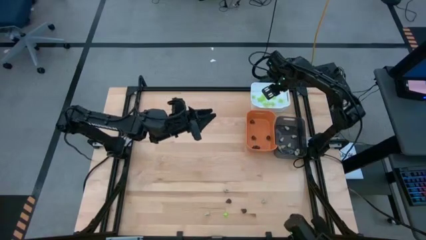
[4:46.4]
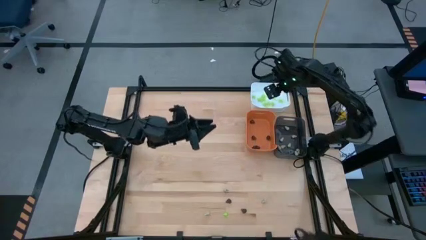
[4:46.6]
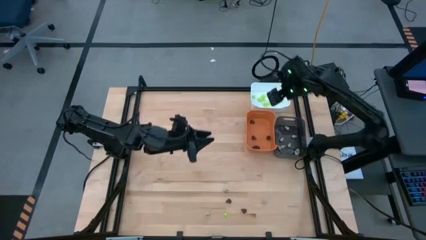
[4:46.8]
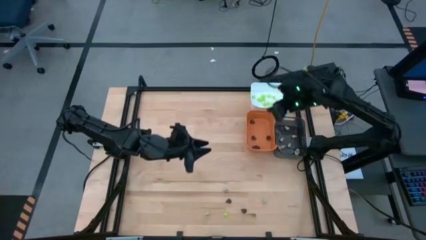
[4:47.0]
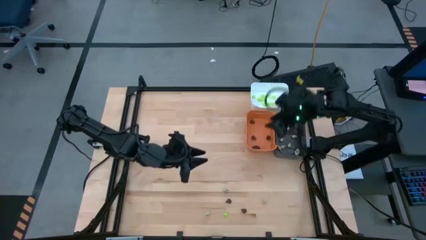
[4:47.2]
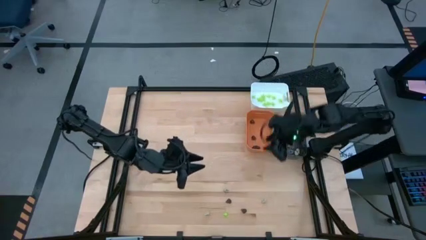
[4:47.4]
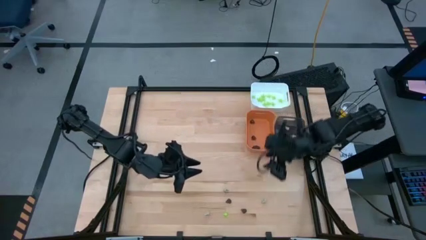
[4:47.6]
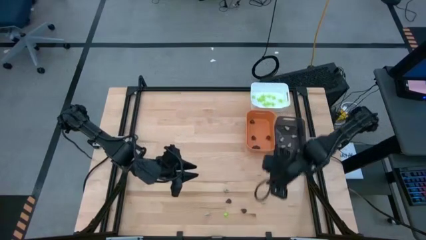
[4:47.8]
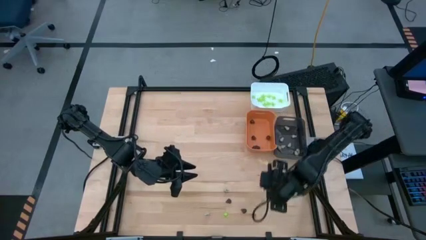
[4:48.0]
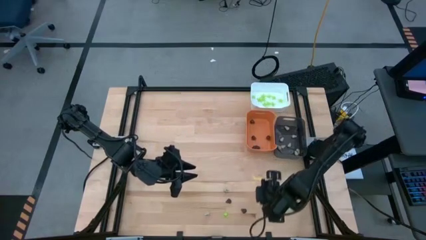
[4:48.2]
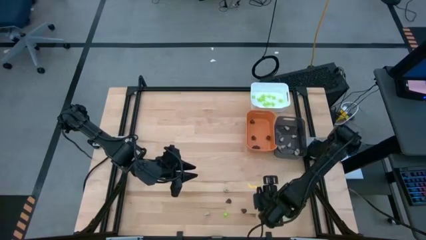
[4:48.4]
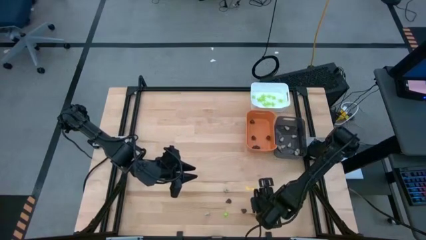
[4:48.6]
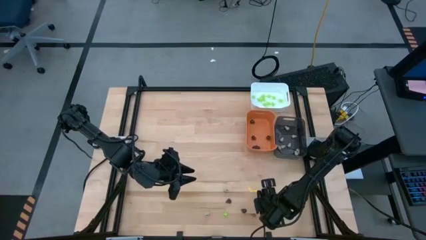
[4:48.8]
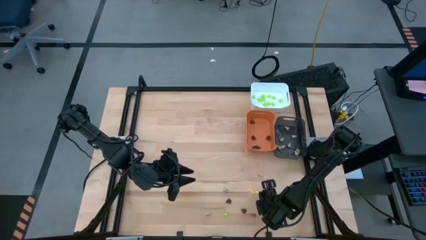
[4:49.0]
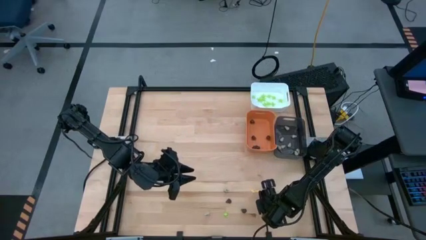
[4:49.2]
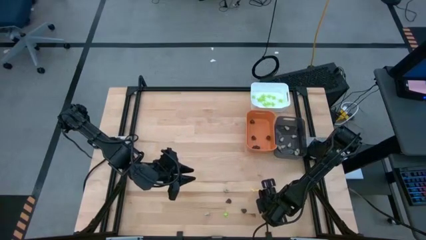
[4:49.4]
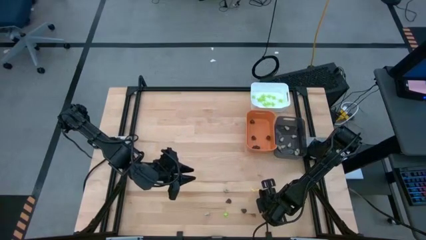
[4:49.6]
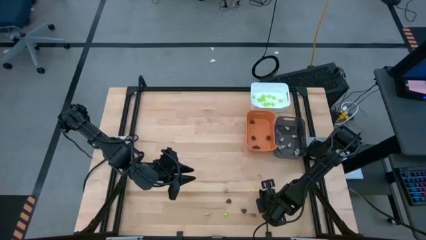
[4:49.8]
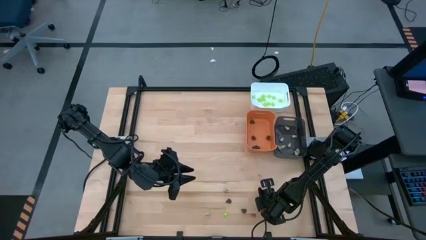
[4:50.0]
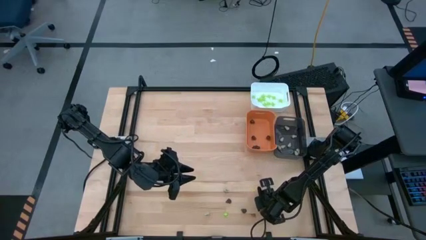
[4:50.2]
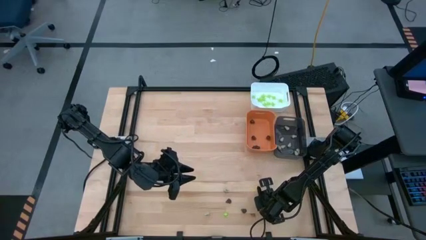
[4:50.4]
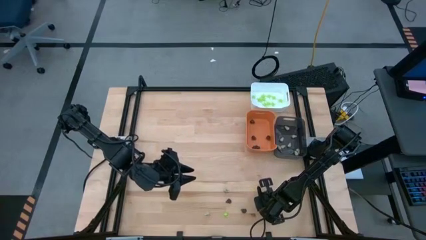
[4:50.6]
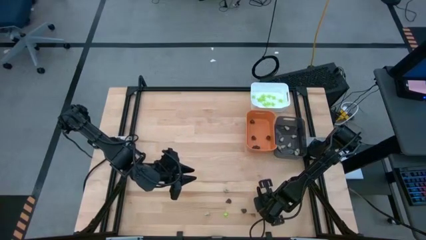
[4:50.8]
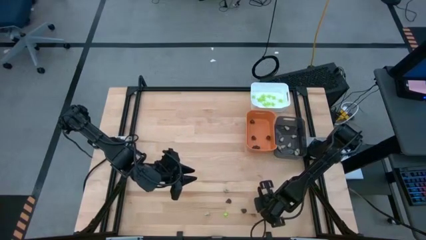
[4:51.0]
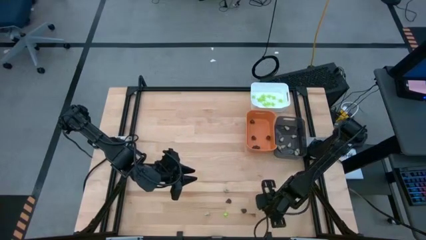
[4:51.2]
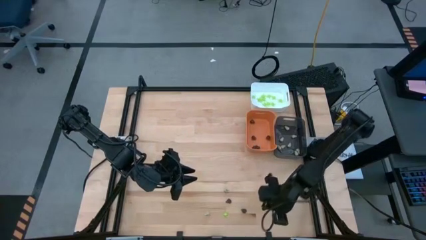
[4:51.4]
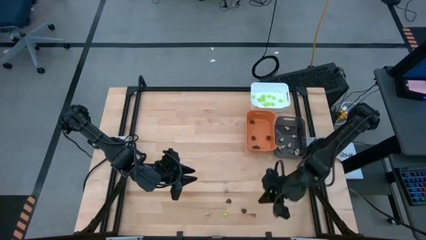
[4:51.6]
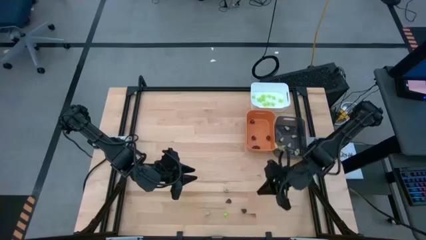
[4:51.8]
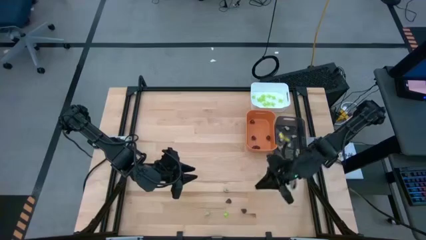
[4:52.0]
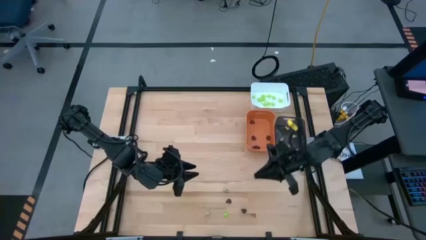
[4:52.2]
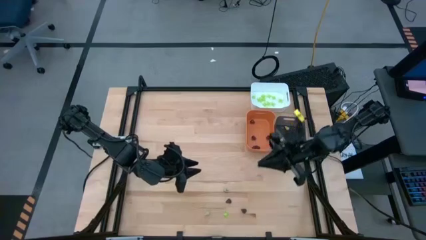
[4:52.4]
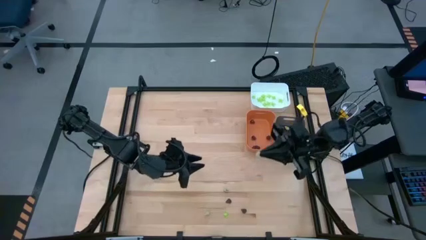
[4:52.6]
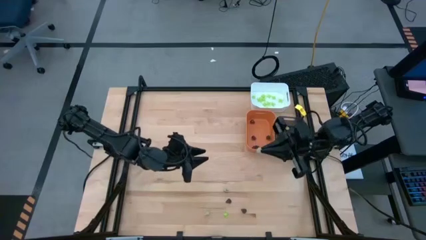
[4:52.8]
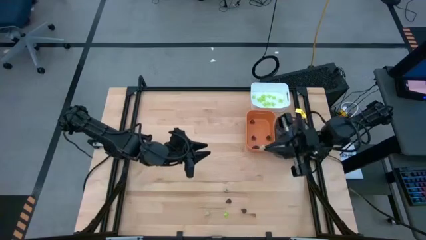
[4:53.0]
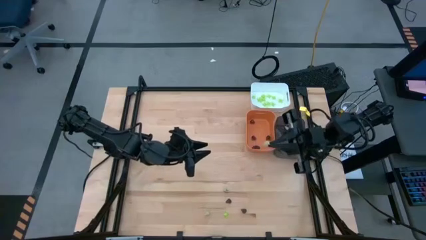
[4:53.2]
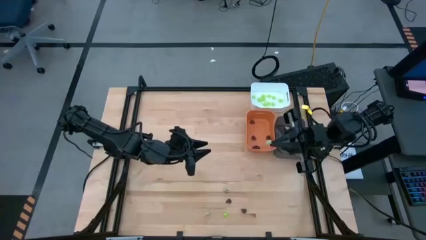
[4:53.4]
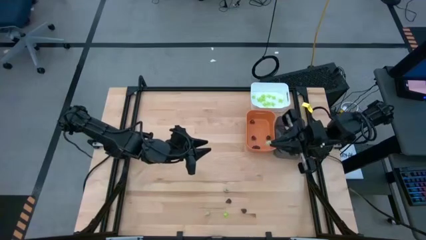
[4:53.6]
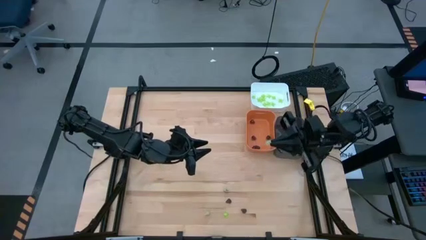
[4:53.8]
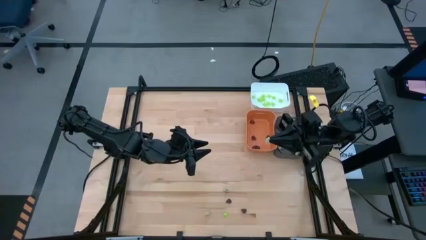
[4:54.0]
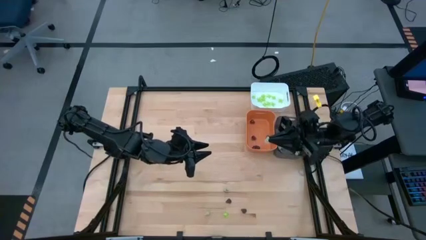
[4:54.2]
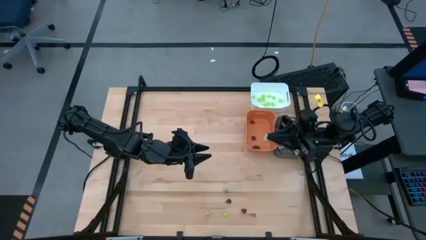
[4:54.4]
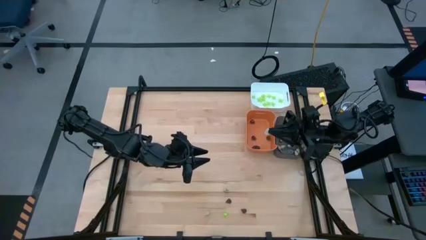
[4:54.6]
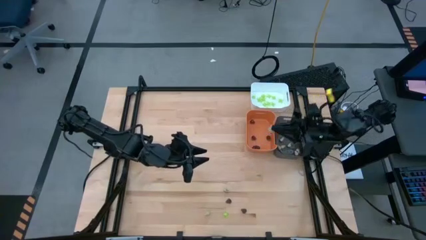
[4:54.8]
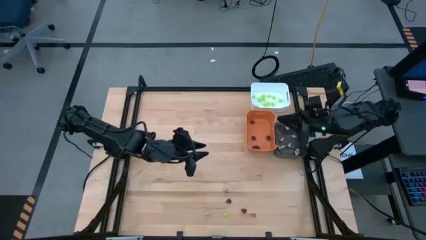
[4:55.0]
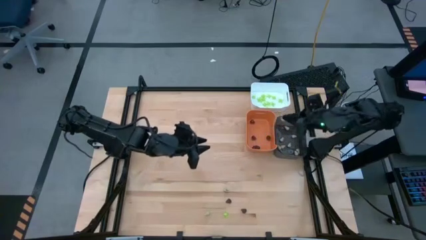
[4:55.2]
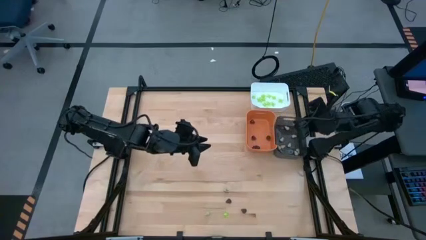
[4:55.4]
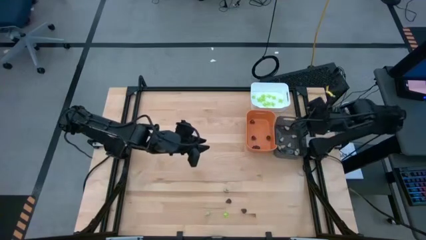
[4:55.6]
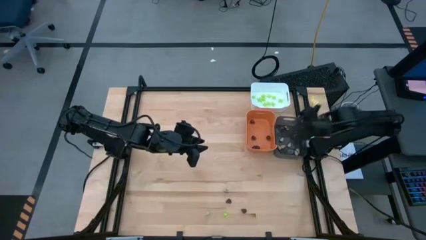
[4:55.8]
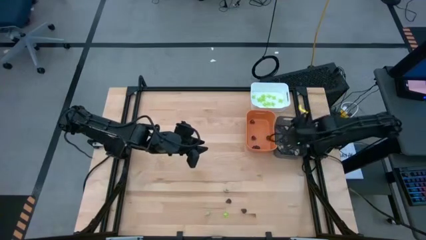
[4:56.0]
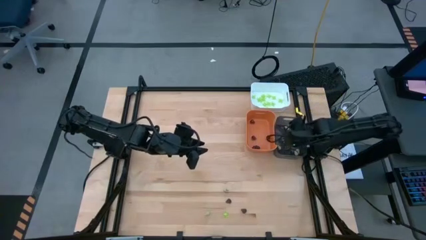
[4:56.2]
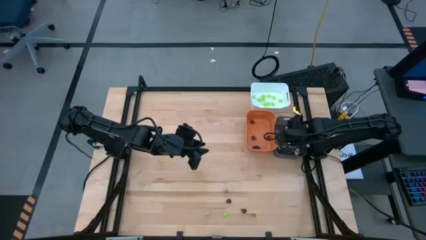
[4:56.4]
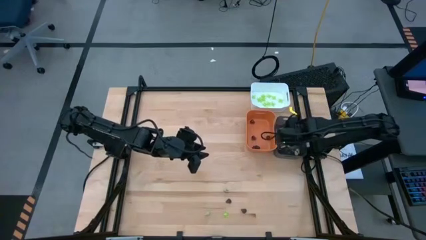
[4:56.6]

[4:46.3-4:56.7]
Task: Sort Halloween decoration
Put the white skull toy into the black bin

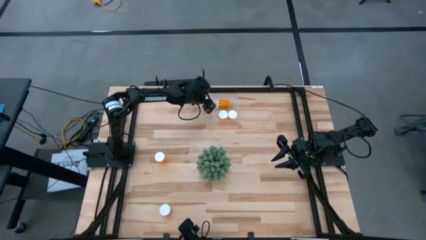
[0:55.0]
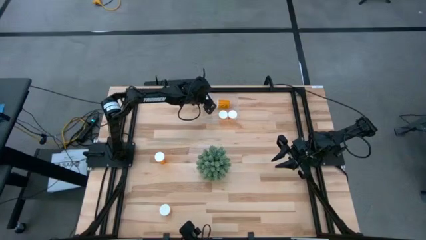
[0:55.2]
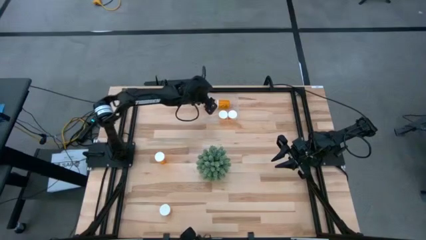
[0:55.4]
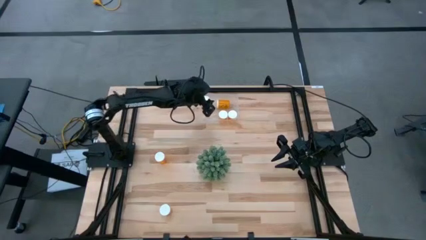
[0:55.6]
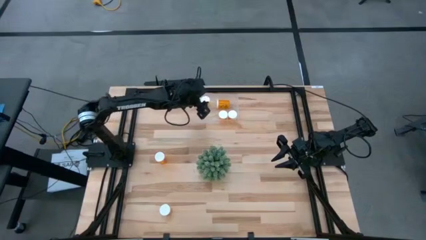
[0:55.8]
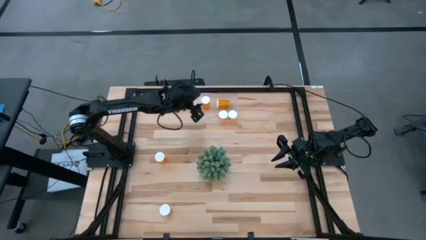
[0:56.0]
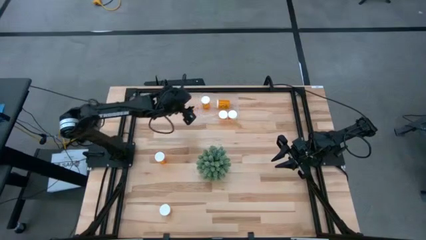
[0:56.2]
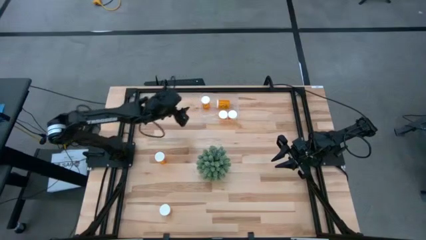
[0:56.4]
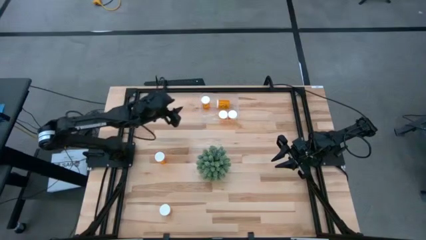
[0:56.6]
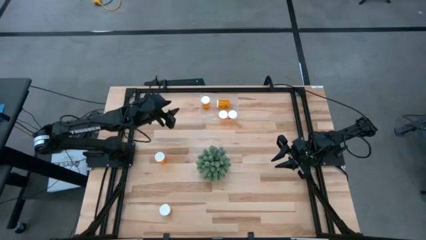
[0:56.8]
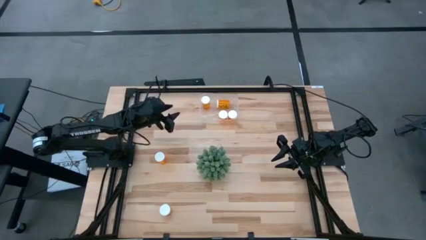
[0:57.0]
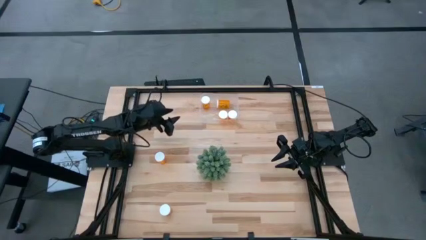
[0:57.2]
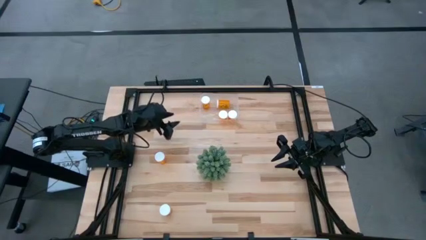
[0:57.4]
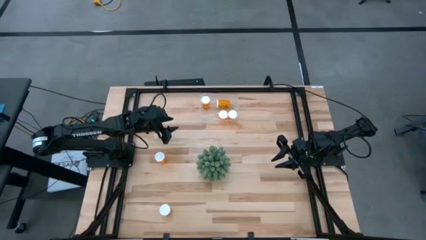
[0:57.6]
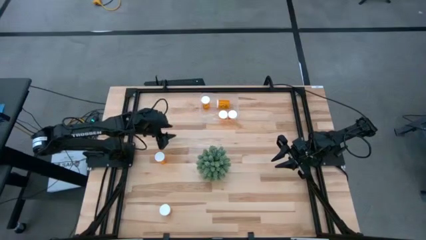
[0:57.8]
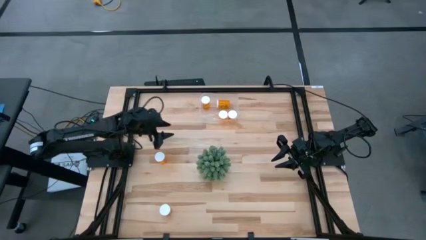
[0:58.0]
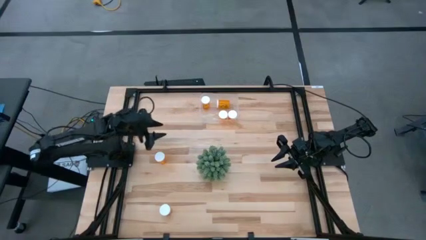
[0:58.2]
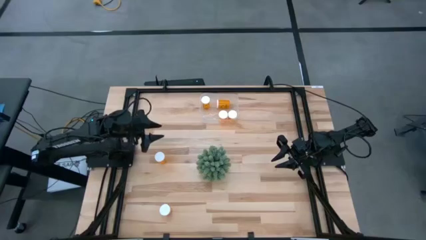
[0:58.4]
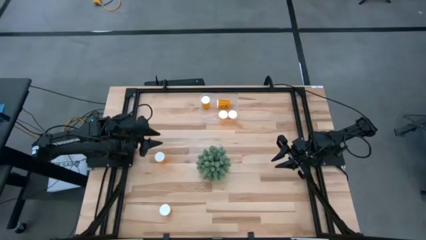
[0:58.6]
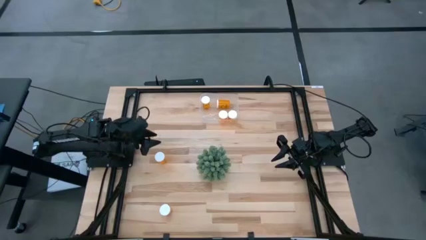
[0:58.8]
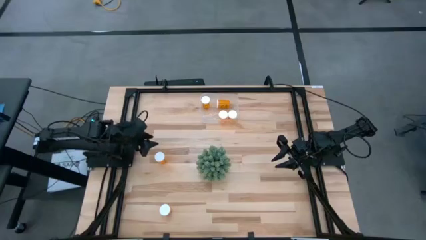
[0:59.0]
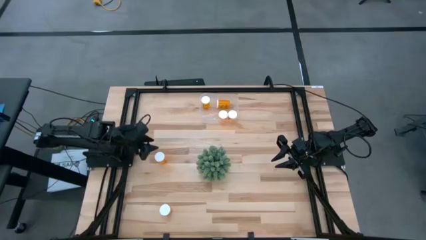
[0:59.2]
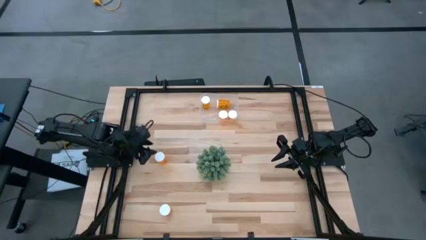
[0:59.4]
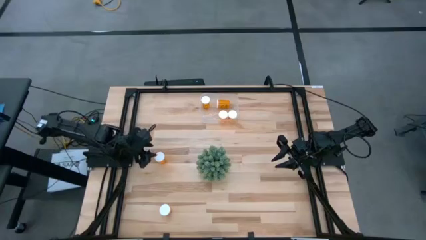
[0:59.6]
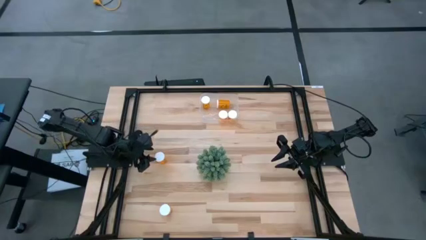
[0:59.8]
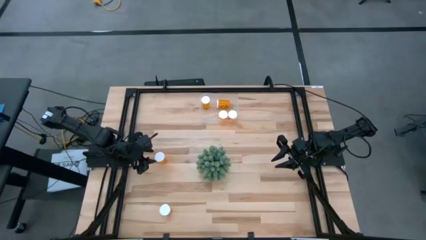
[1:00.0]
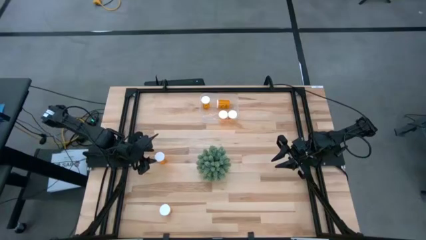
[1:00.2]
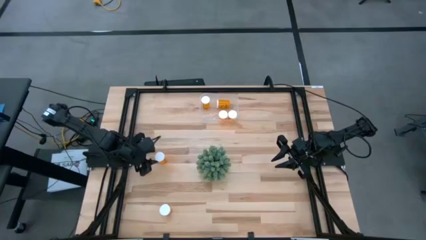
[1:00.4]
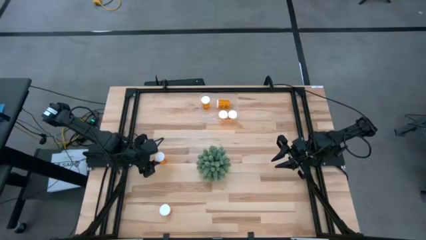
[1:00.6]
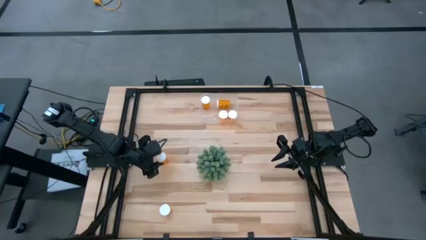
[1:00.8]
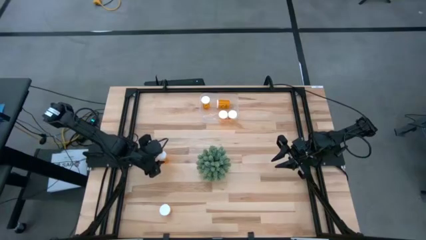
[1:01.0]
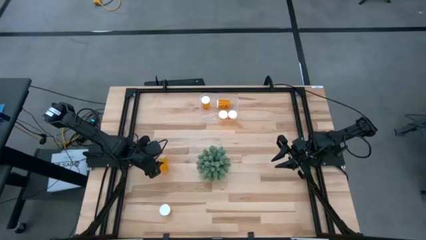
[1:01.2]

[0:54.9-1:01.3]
Task: Pick and place pill bottles into a basket
Put the orange pill bottle into the transparent bin
